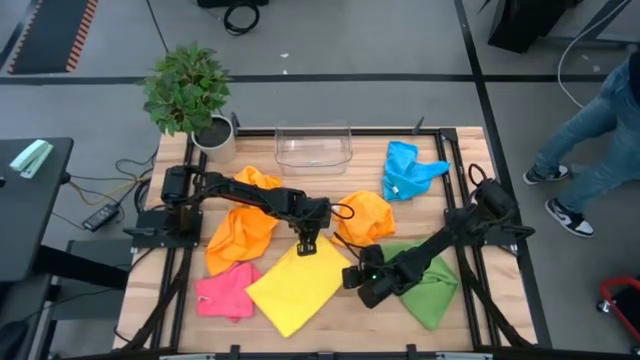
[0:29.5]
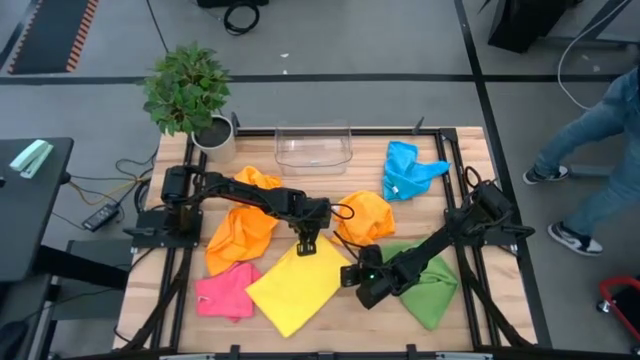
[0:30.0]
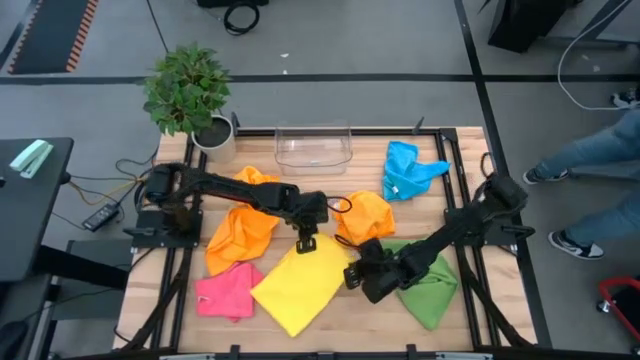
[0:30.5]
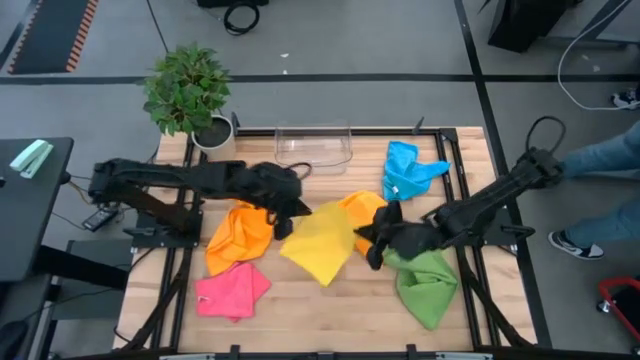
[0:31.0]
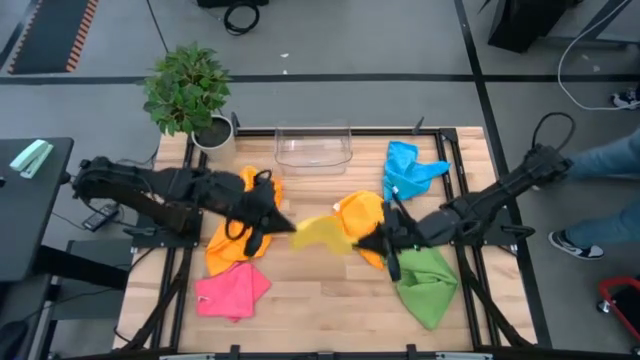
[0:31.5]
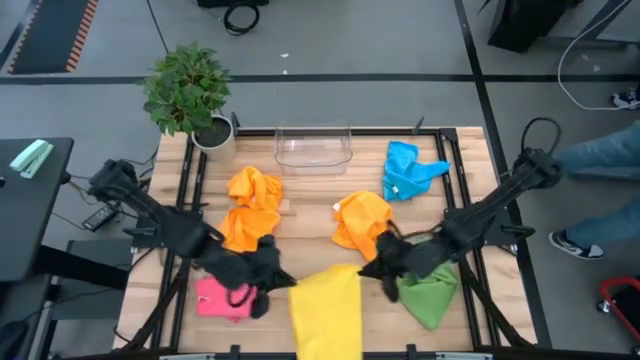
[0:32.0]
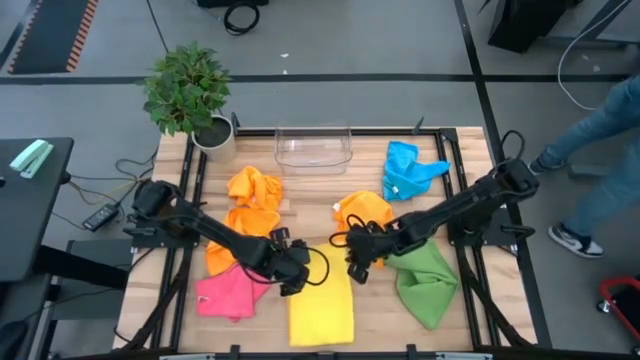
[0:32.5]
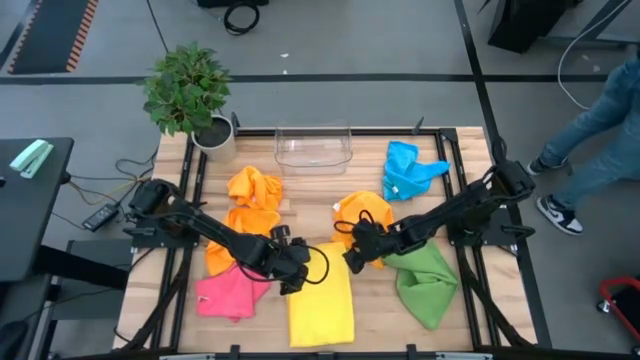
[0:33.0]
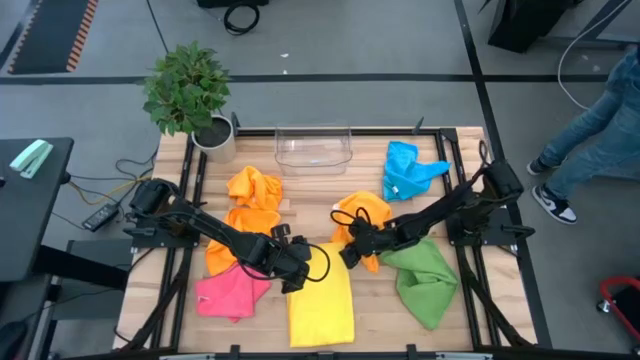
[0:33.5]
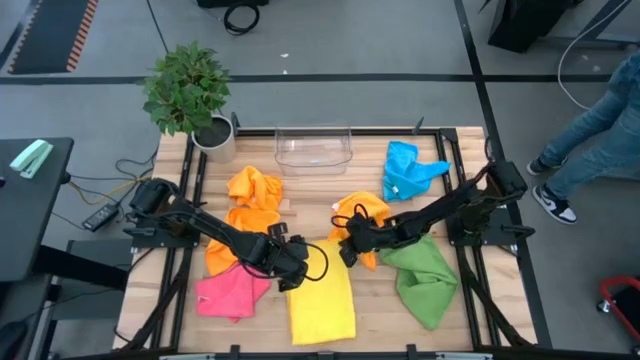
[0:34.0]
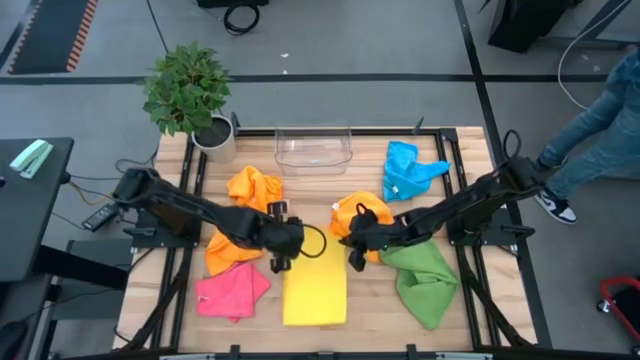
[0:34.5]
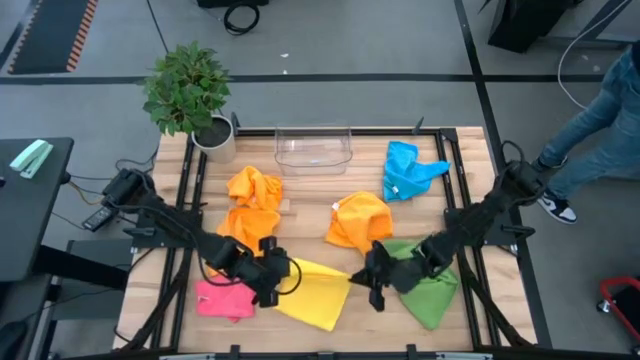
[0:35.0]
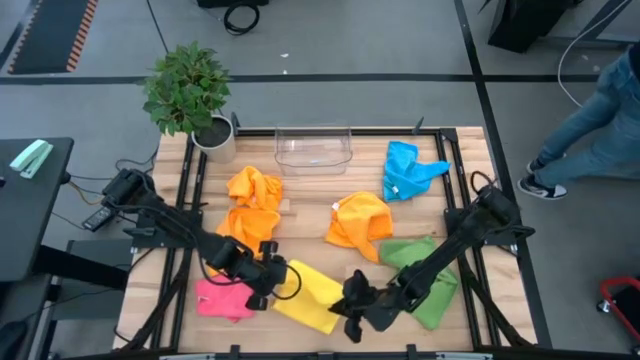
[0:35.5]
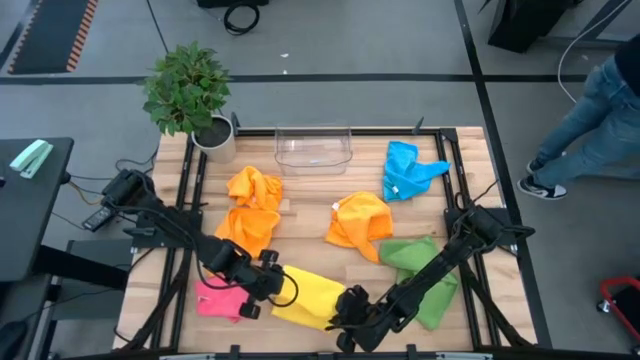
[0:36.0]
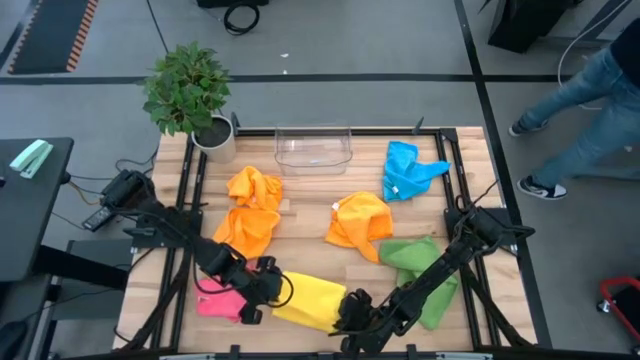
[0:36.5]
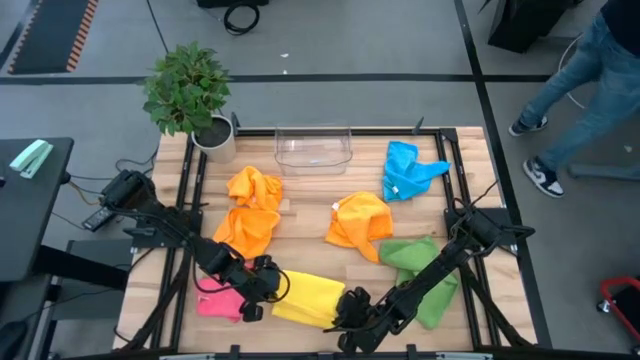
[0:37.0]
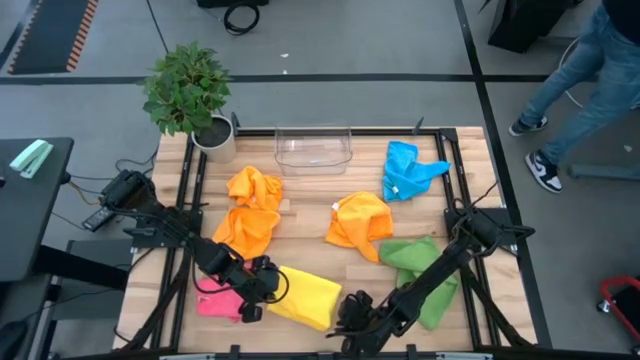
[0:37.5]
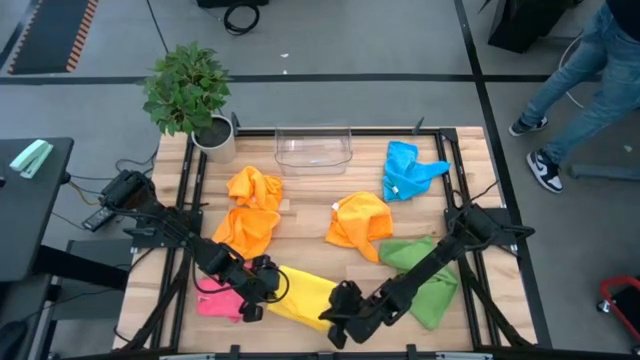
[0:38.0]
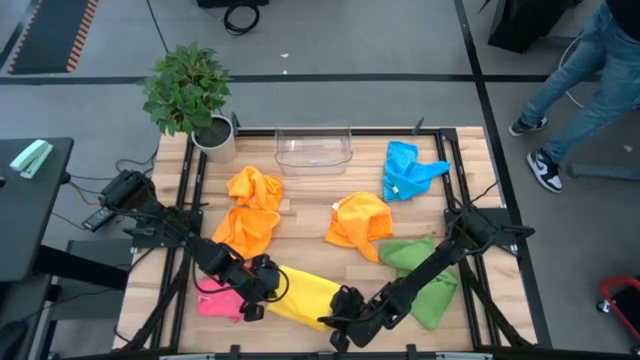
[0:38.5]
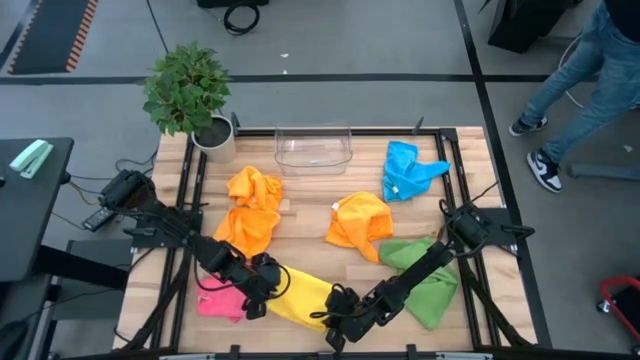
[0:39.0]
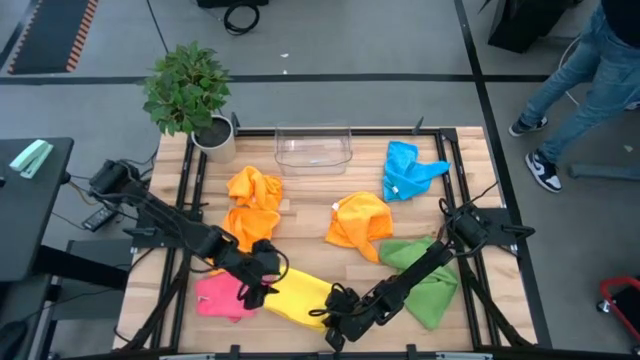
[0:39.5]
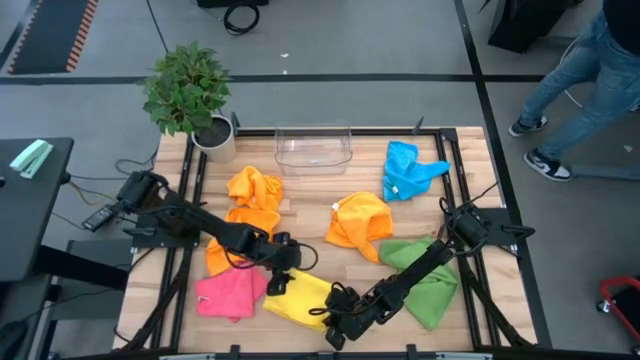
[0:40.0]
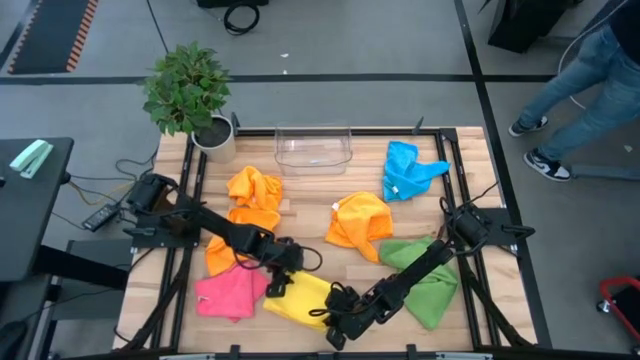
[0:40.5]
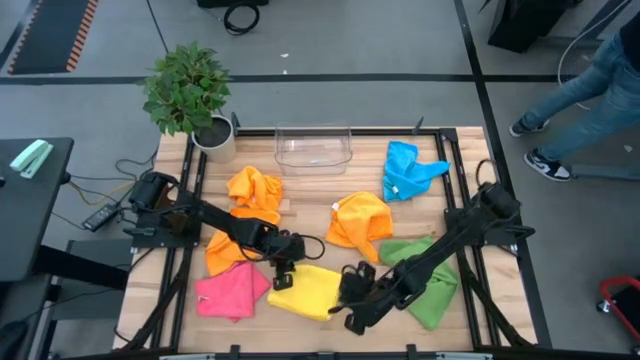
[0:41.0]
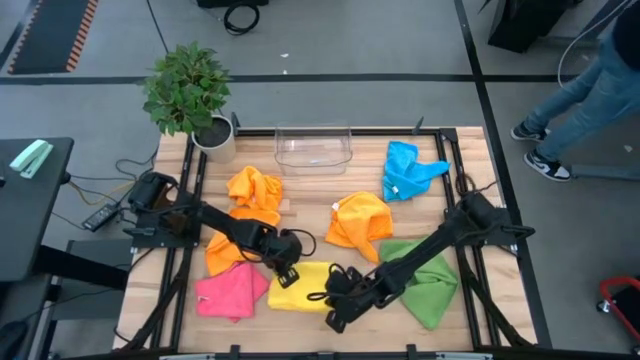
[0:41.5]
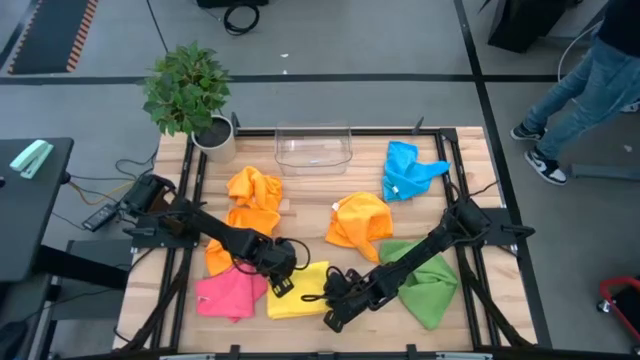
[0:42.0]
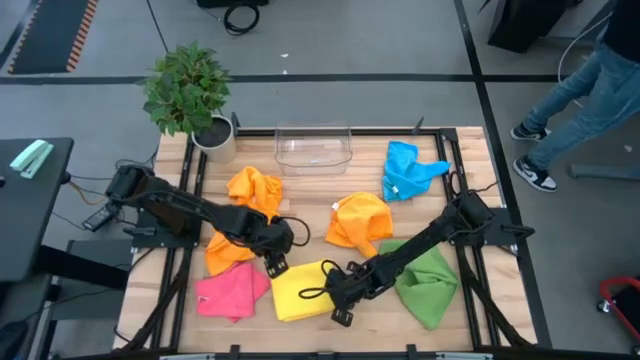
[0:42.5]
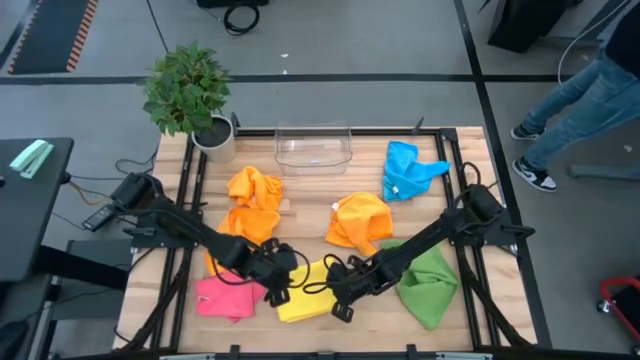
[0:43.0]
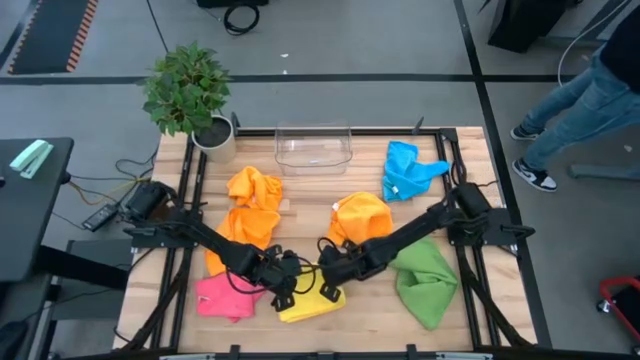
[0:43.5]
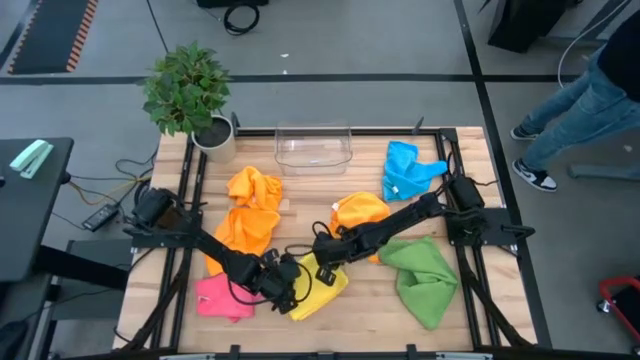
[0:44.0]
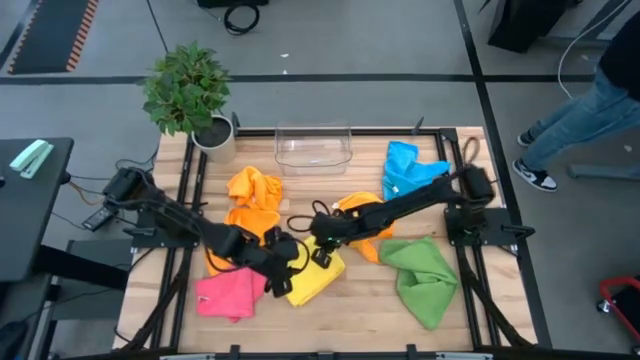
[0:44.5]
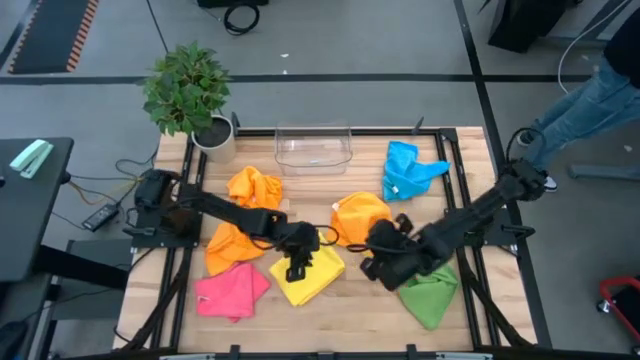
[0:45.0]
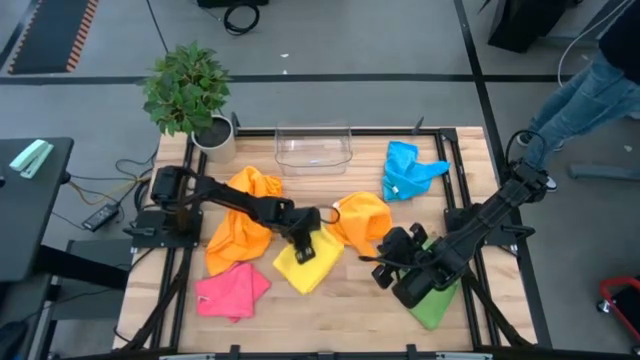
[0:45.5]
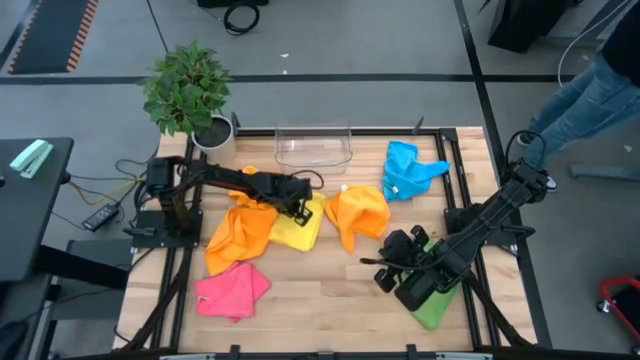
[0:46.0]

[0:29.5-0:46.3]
Task: Fold microfiber towels
Fold the yellow microfiber cloth

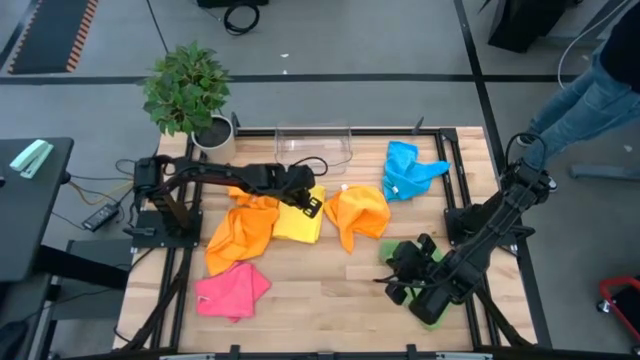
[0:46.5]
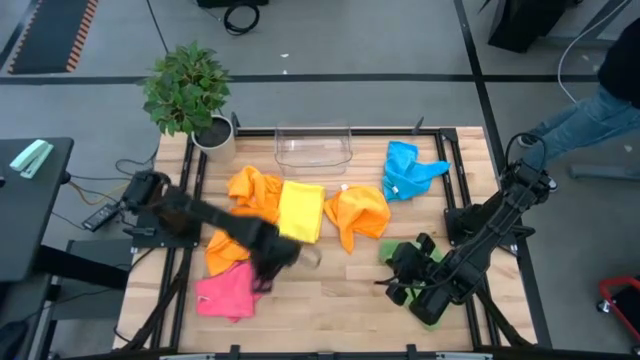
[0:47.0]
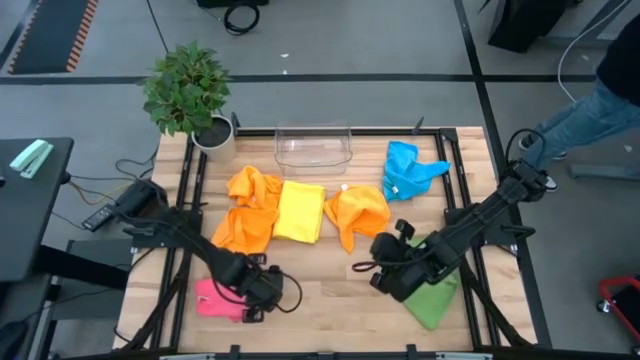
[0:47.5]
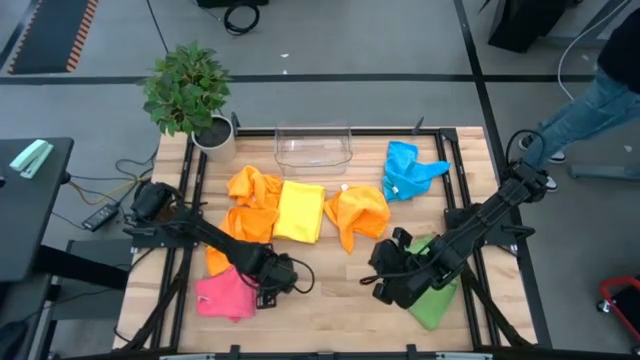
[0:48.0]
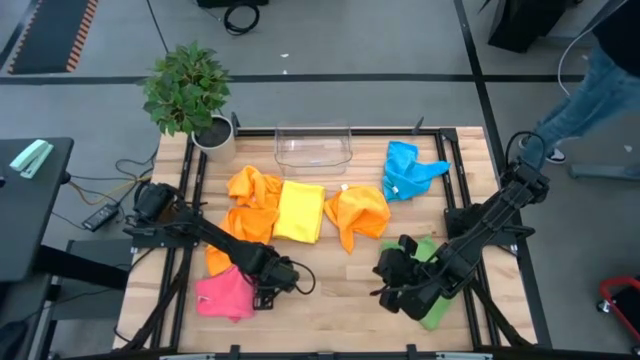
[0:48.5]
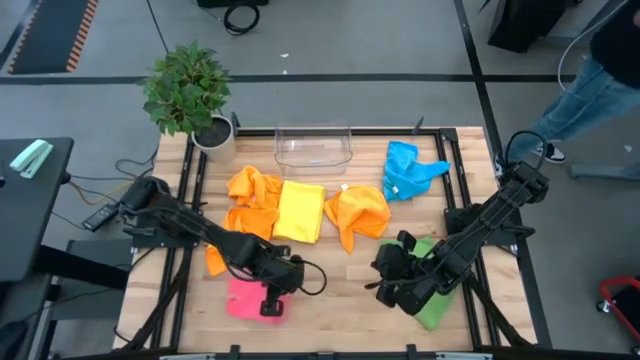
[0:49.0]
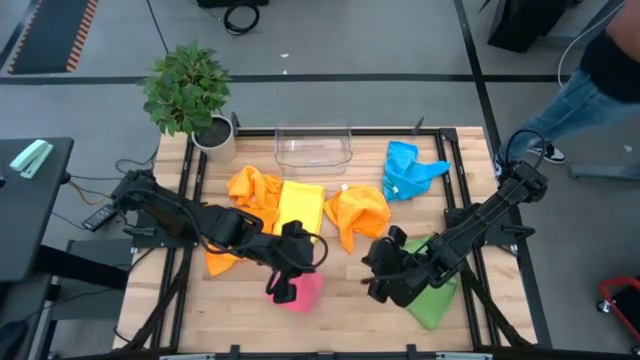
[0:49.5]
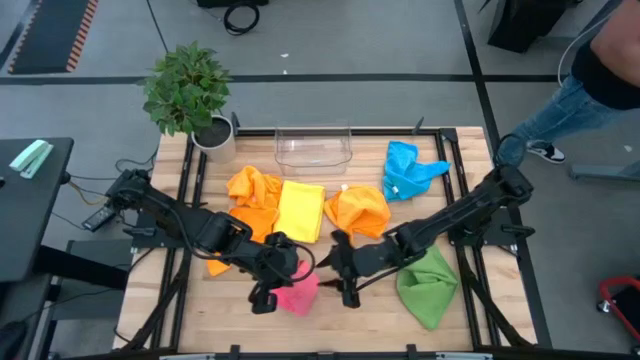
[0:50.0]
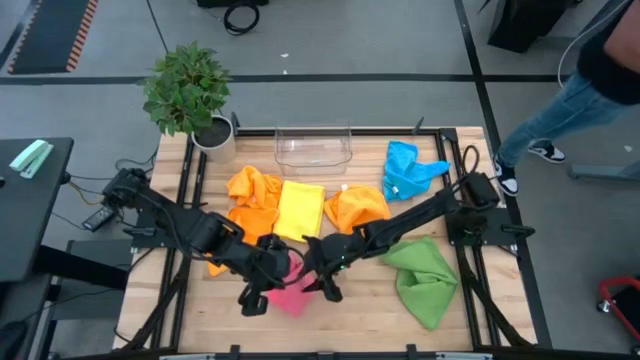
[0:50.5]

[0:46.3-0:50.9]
Fold the pink microfiber cloth
